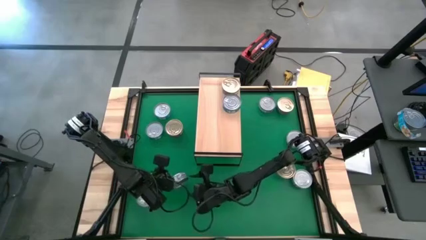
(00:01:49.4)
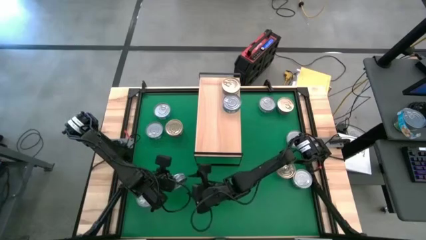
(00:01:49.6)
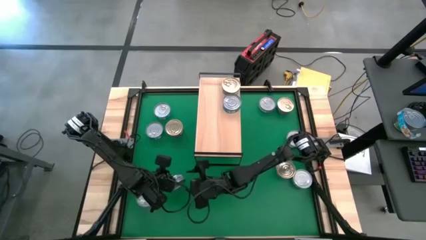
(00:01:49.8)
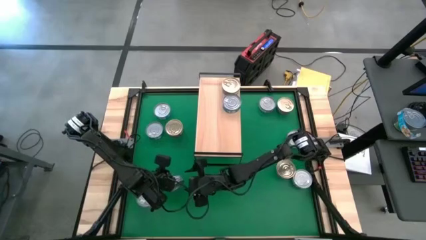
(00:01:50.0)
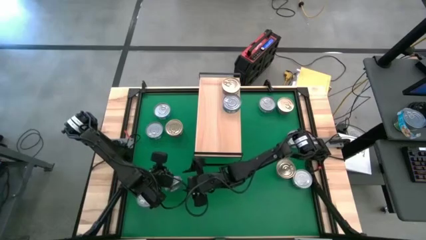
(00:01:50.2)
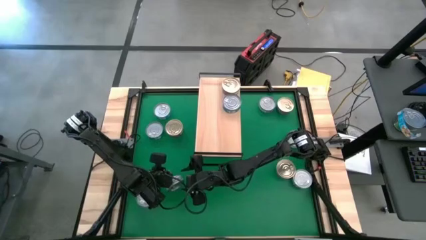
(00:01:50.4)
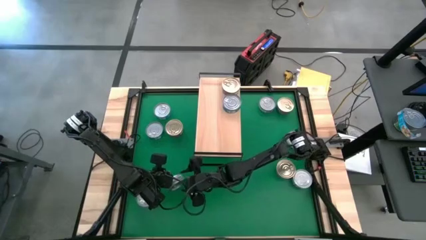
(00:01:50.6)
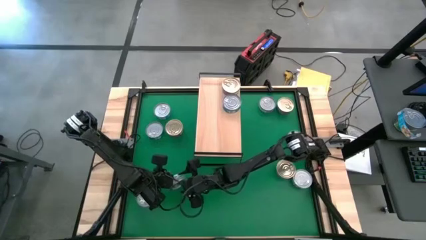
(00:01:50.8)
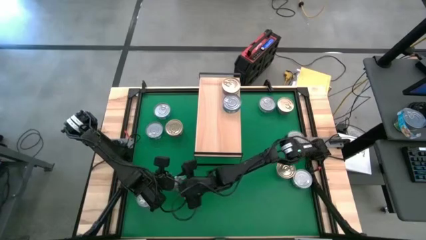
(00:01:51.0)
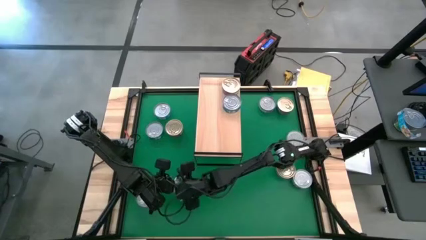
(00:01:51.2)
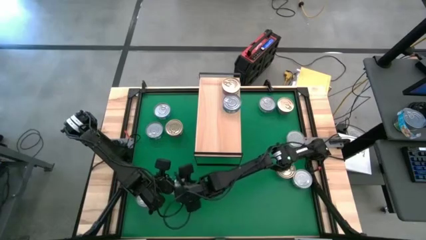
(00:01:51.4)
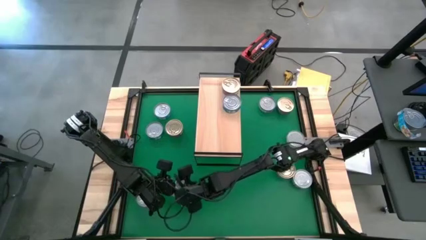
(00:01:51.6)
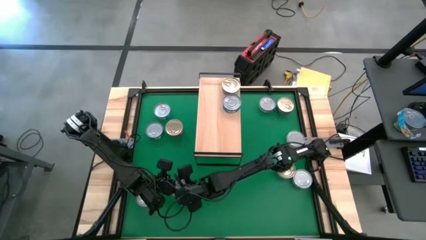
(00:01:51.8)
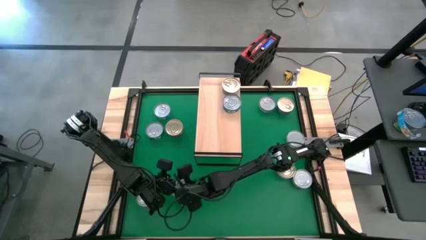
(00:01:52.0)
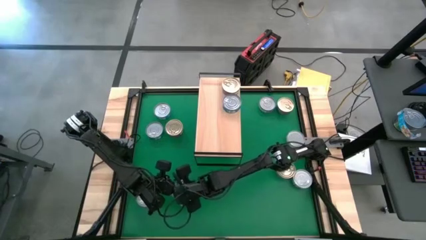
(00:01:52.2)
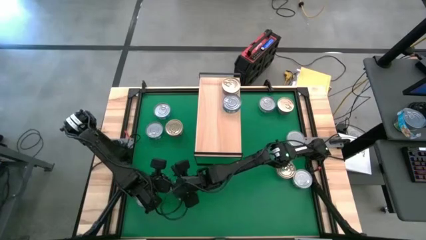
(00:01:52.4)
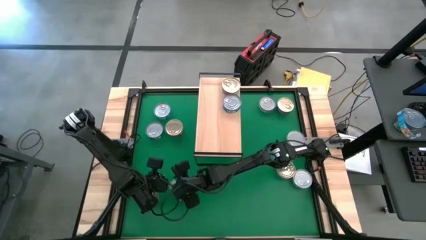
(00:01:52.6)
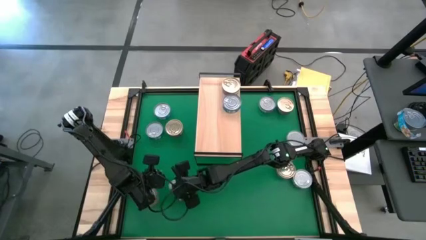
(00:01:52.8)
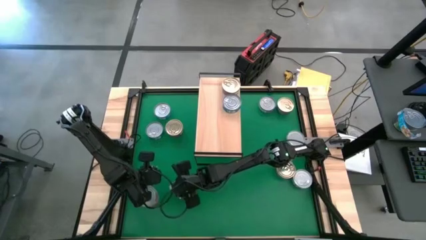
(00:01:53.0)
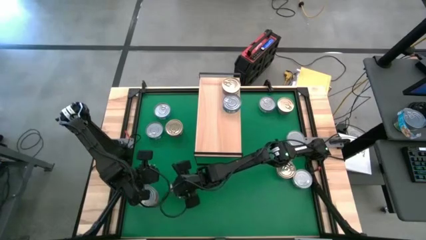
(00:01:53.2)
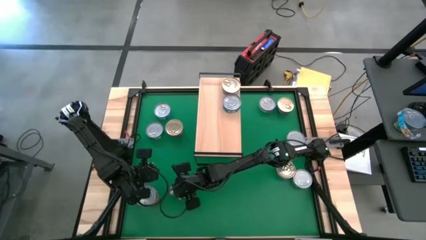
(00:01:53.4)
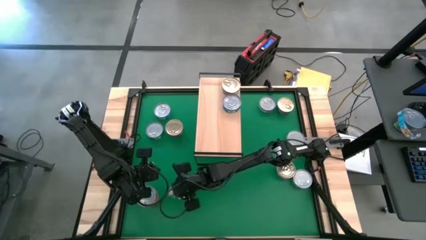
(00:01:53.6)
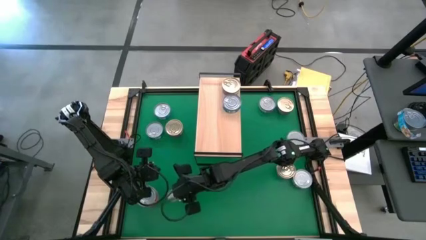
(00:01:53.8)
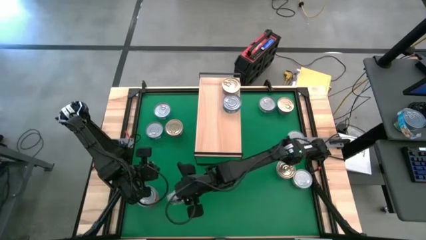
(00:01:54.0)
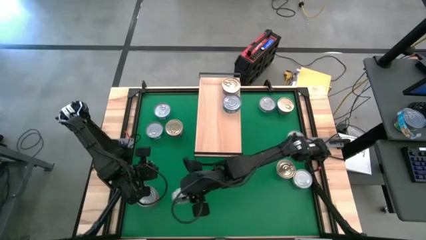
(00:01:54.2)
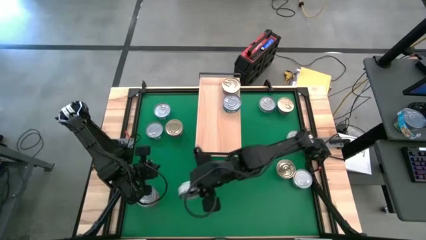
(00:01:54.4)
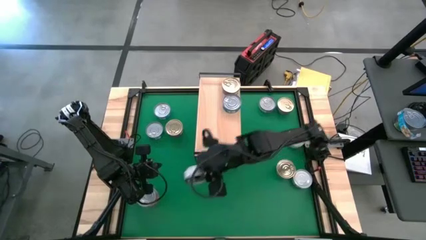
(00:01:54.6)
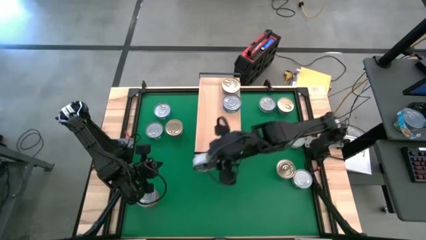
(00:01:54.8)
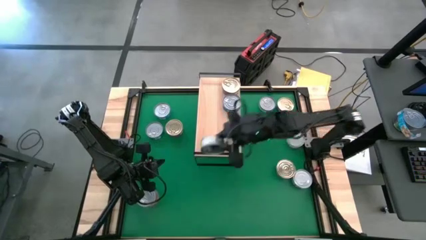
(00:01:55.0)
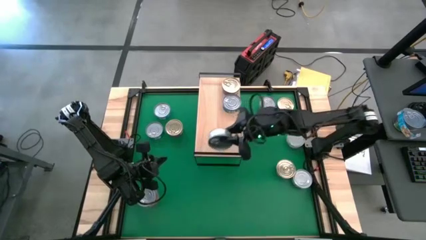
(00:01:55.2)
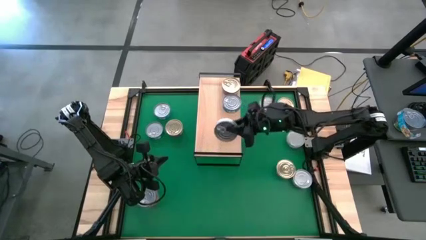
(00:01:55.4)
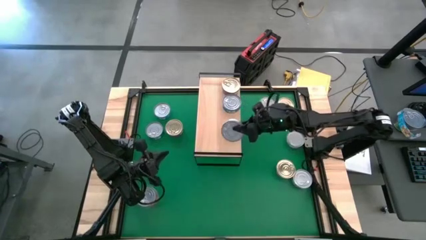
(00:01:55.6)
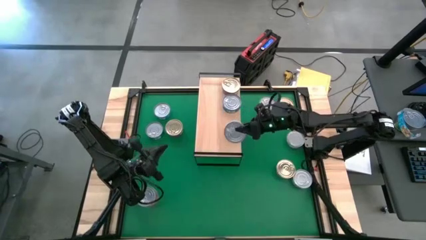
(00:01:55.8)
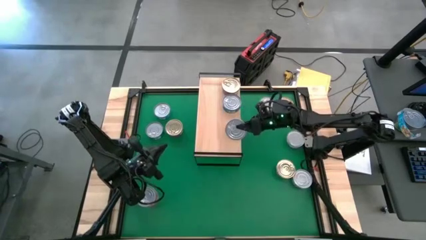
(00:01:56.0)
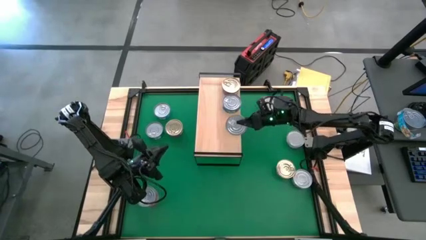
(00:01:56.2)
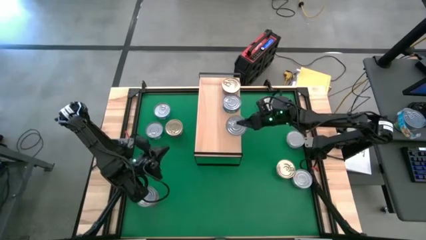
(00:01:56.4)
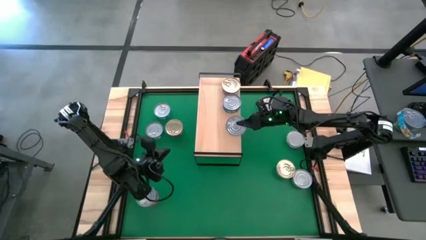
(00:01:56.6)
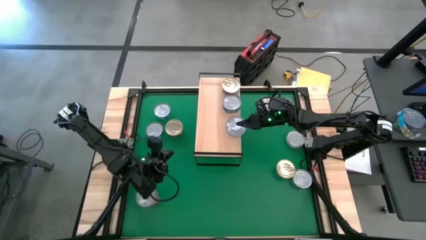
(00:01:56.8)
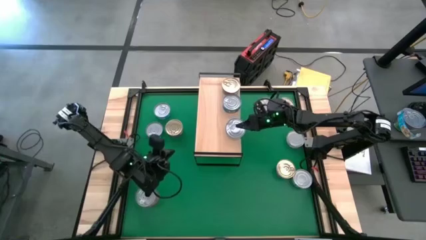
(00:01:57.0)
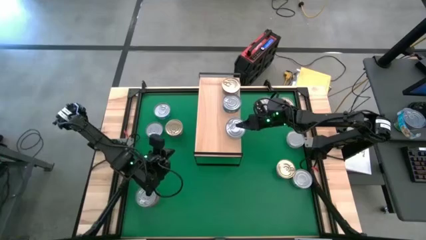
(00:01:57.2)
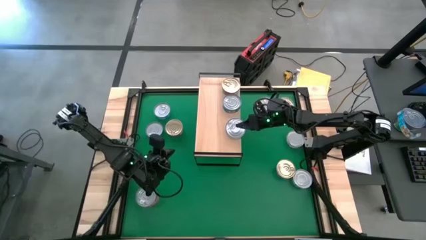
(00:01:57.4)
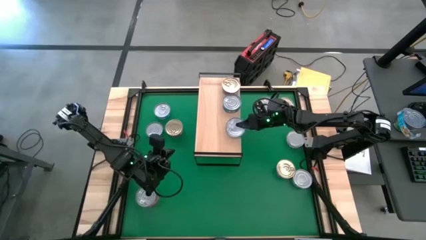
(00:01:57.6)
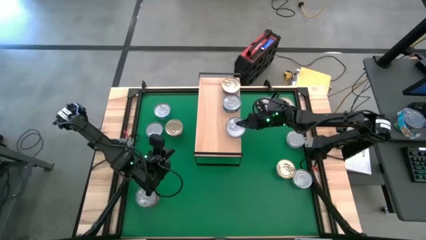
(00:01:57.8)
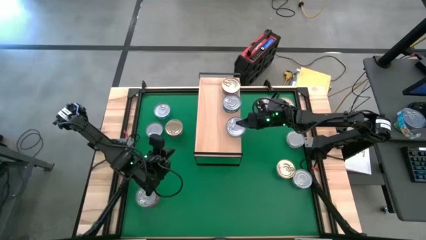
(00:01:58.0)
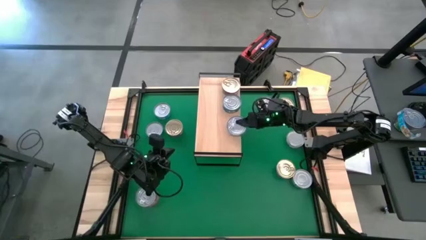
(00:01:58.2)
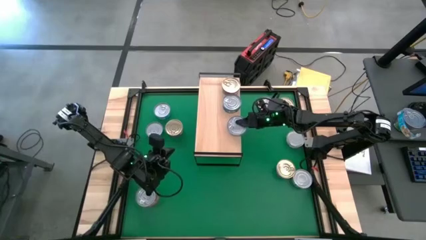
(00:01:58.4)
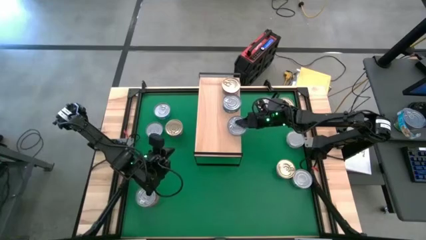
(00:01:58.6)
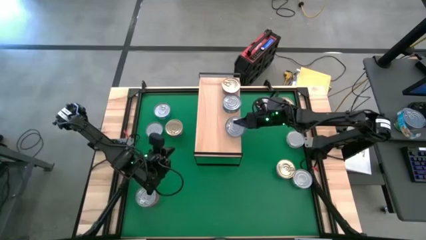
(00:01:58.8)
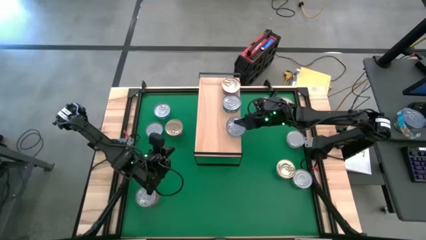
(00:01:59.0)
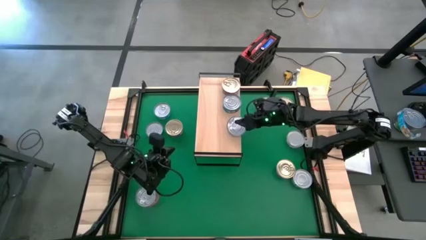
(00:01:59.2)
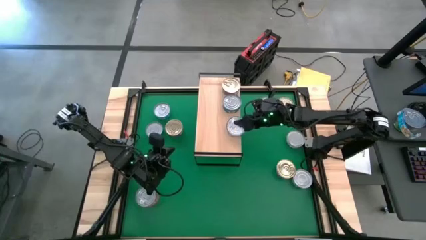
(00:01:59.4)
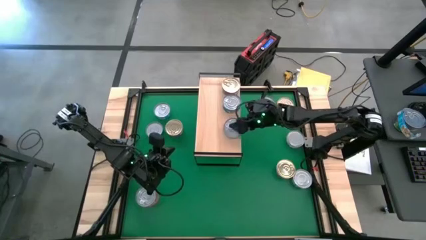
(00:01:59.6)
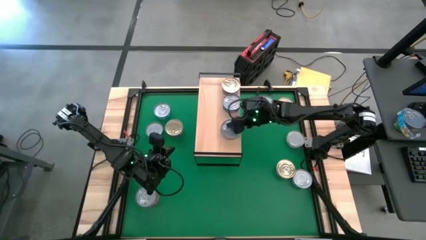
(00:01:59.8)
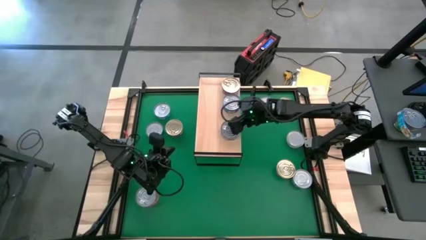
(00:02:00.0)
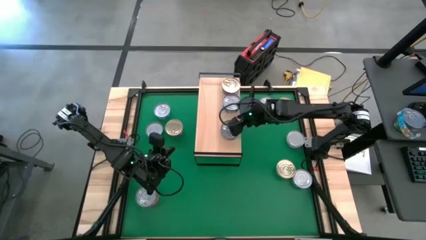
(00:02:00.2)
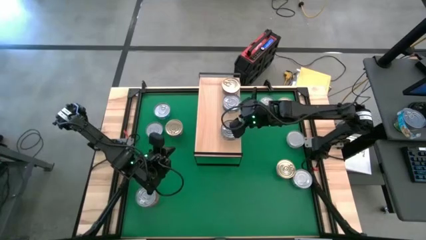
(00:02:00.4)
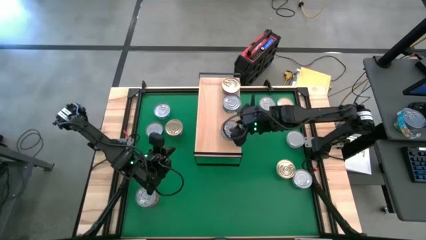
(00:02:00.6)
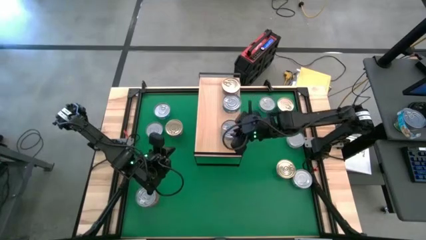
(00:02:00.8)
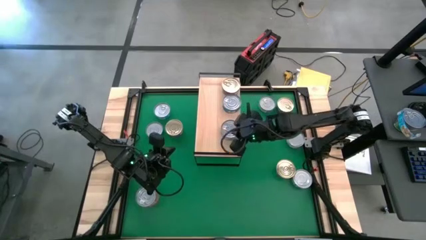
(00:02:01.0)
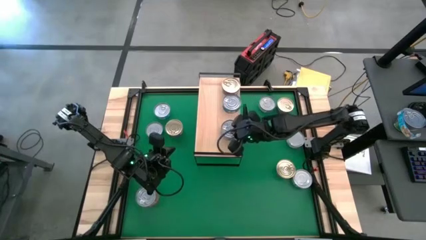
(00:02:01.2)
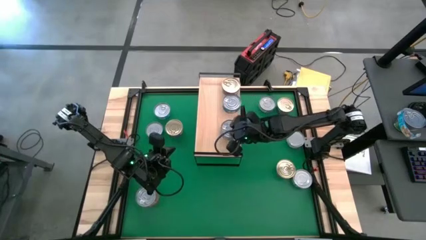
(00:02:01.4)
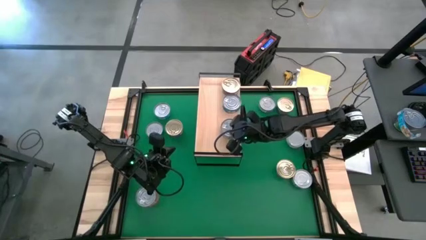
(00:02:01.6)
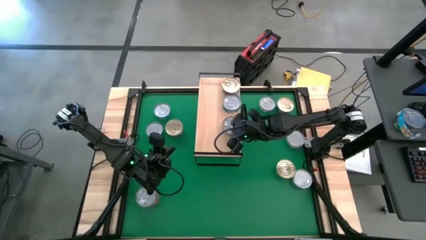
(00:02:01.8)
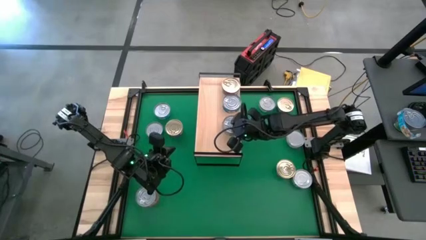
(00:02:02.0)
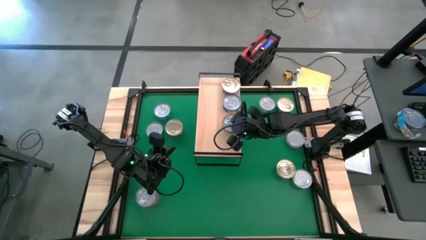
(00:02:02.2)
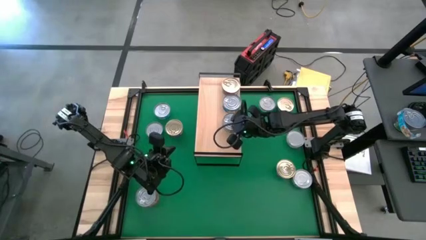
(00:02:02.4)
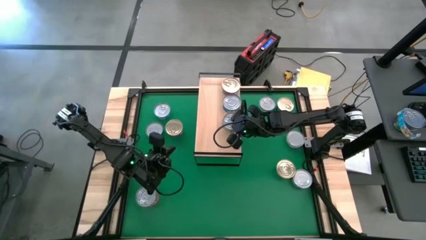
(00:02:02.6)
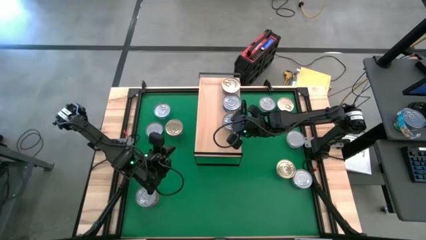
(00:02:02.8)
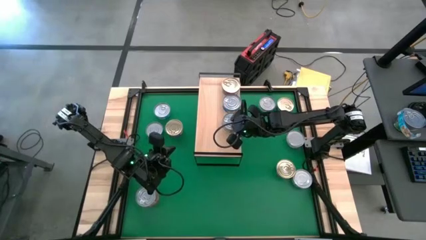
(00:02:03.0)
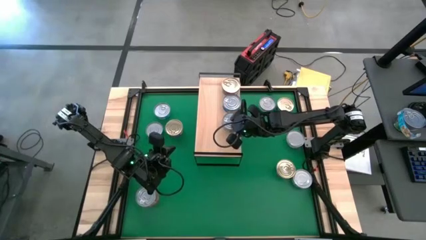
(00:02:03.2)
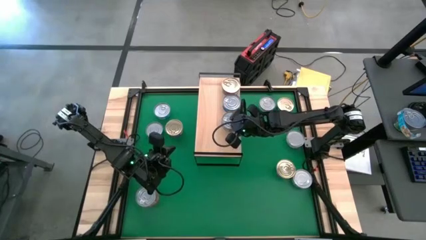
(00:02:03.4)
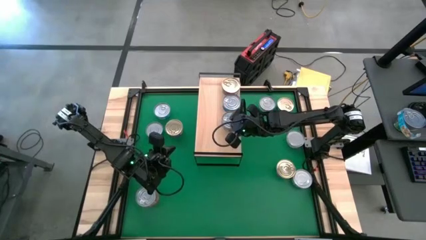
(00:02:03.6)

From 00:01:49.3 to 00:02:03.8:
Task: Stack canned seafood by type on shelf
Put the bottom green tuna can on the shelf
